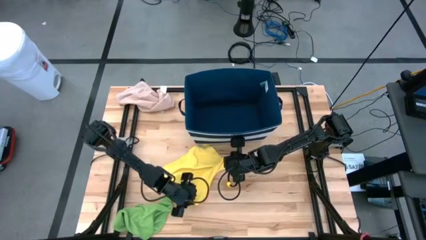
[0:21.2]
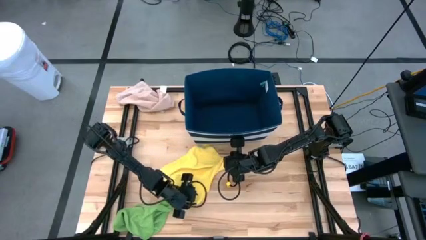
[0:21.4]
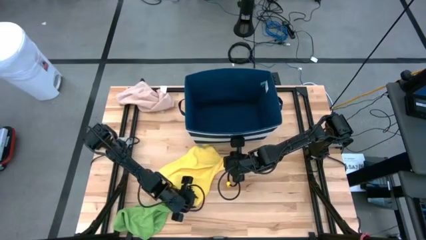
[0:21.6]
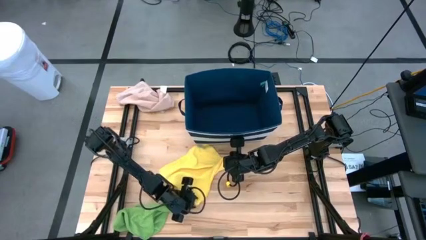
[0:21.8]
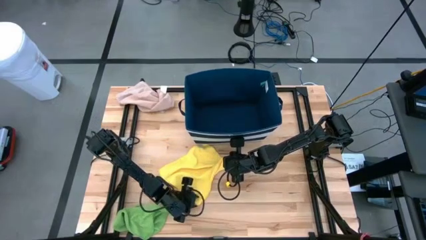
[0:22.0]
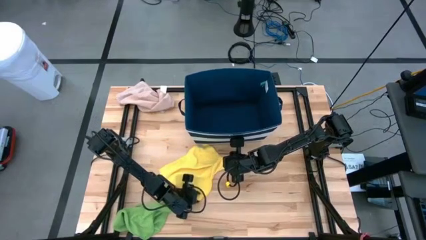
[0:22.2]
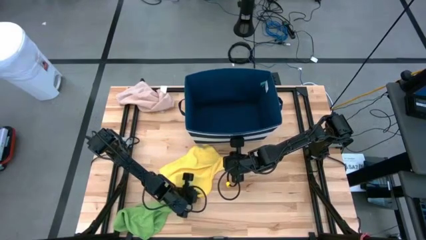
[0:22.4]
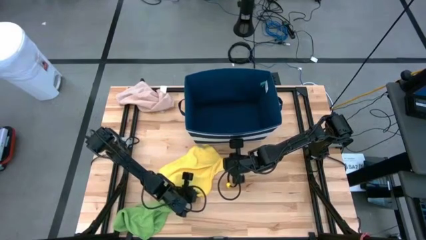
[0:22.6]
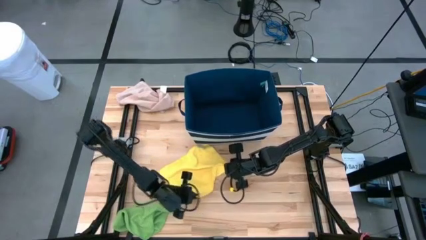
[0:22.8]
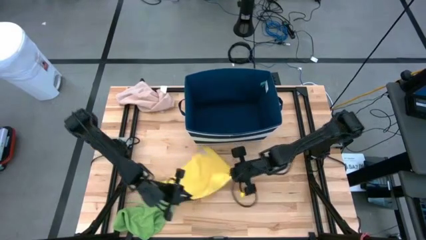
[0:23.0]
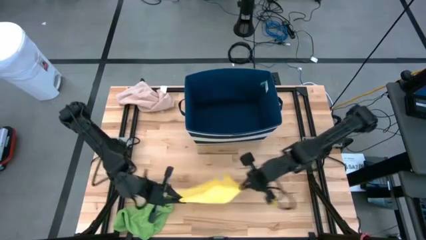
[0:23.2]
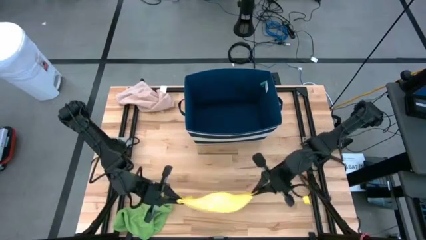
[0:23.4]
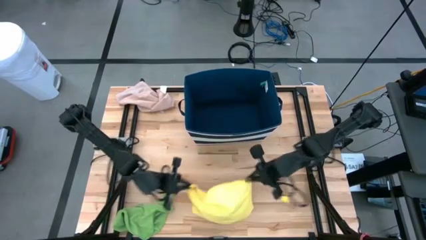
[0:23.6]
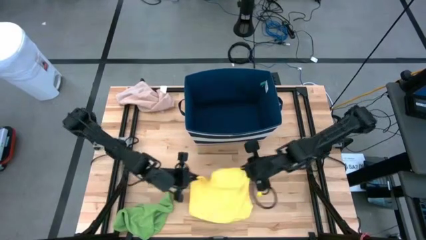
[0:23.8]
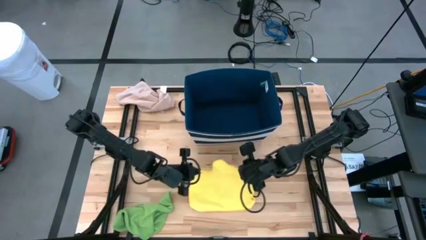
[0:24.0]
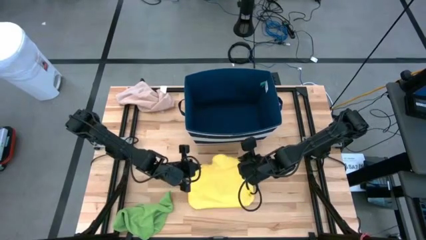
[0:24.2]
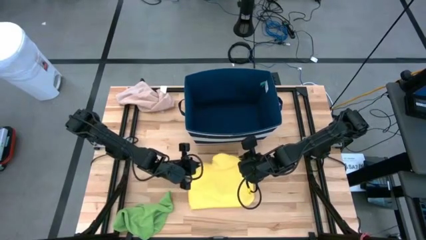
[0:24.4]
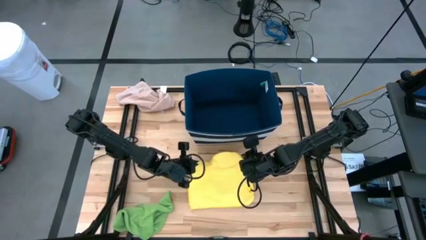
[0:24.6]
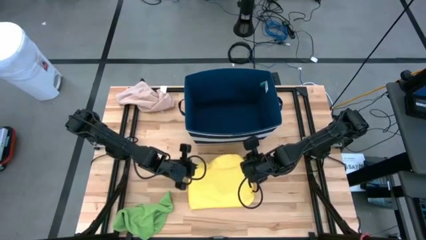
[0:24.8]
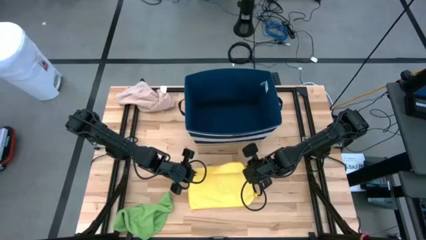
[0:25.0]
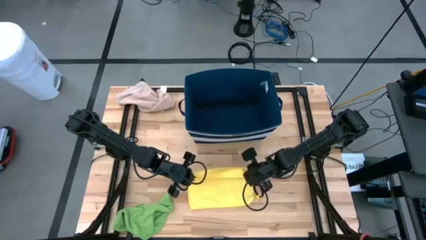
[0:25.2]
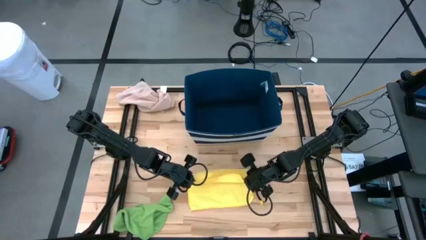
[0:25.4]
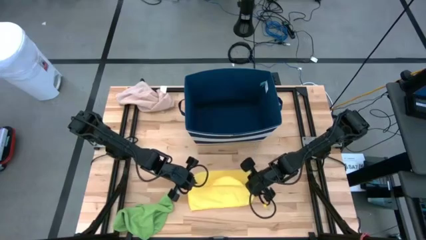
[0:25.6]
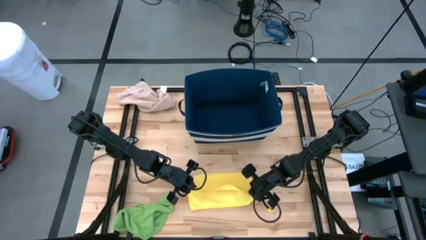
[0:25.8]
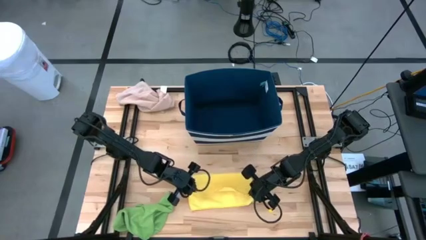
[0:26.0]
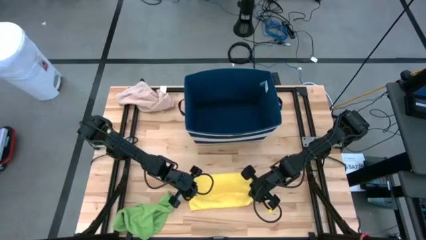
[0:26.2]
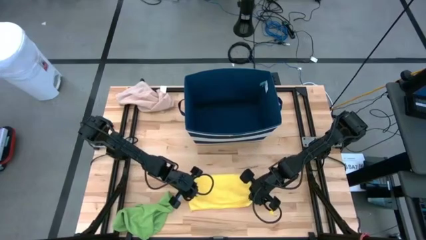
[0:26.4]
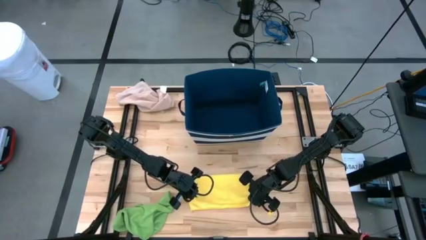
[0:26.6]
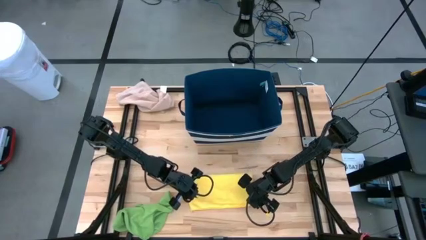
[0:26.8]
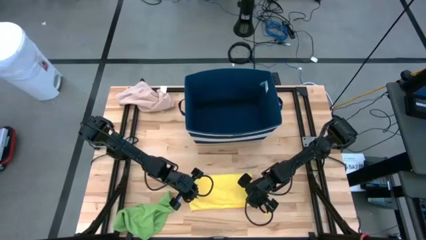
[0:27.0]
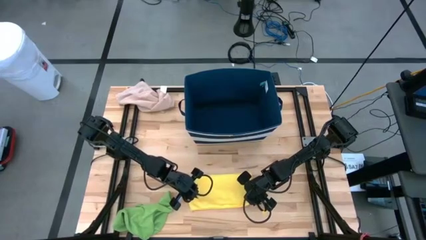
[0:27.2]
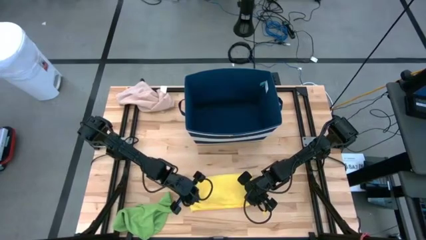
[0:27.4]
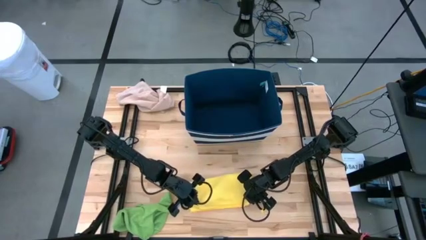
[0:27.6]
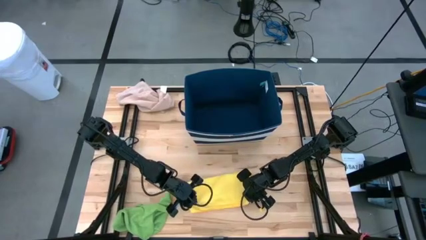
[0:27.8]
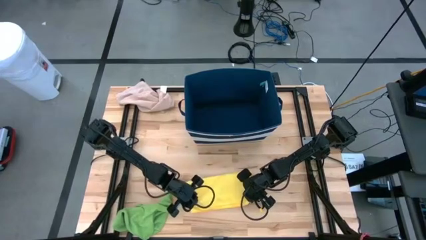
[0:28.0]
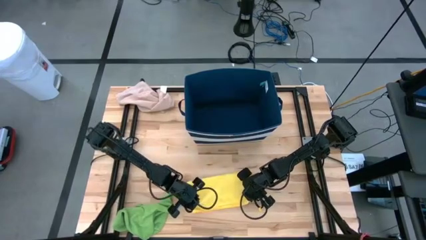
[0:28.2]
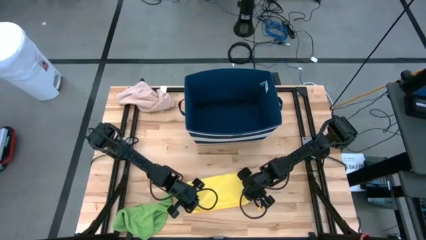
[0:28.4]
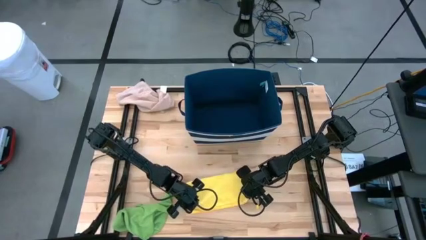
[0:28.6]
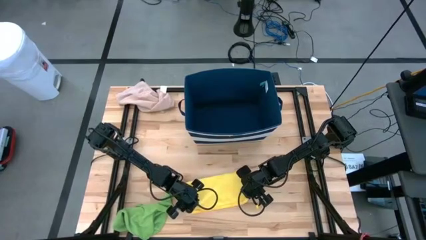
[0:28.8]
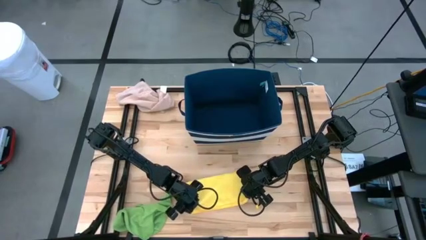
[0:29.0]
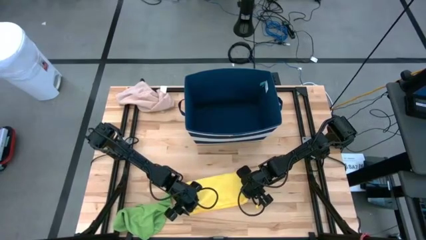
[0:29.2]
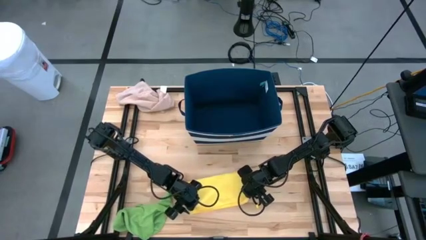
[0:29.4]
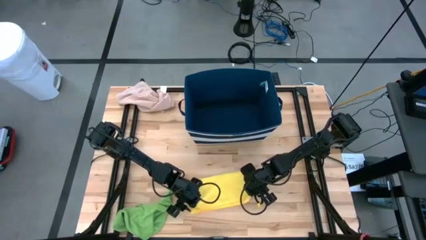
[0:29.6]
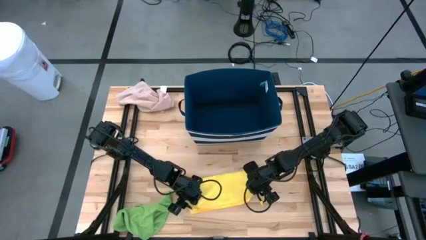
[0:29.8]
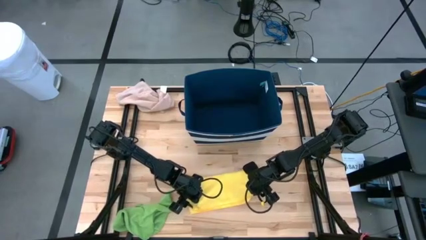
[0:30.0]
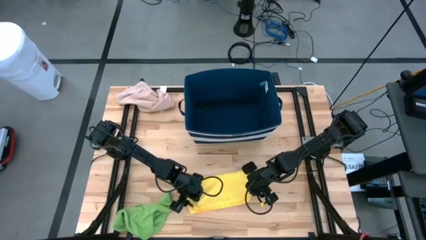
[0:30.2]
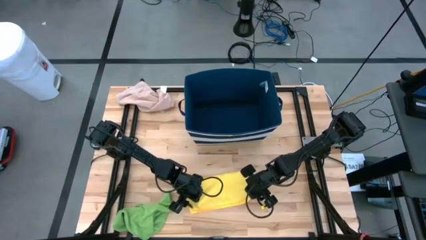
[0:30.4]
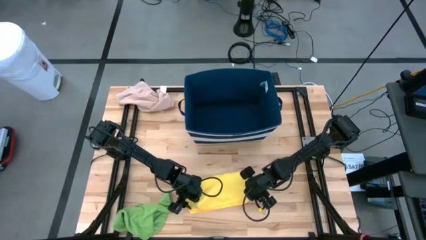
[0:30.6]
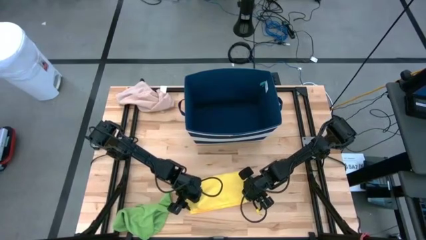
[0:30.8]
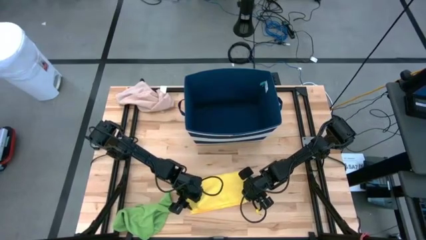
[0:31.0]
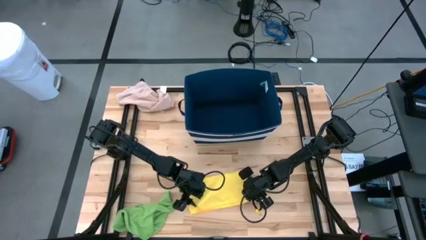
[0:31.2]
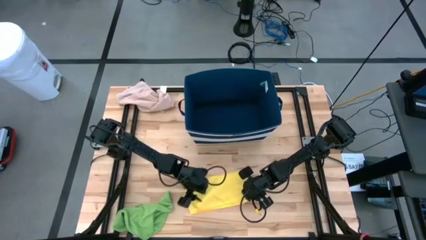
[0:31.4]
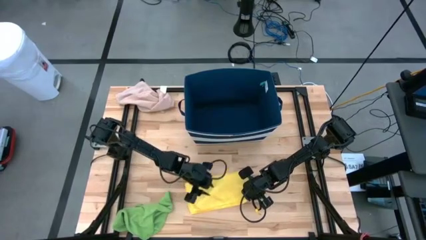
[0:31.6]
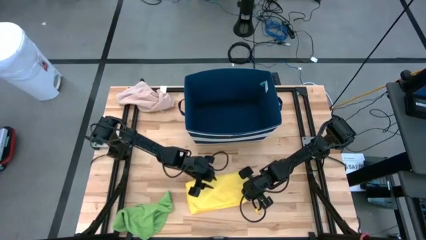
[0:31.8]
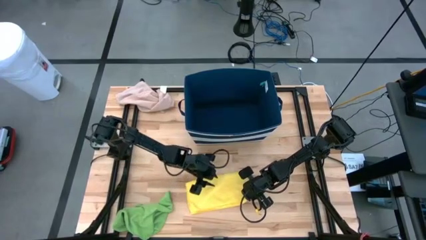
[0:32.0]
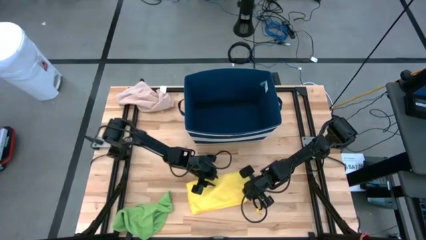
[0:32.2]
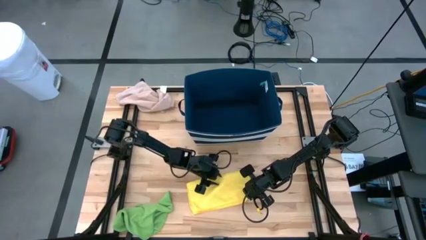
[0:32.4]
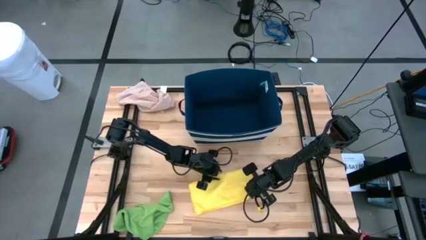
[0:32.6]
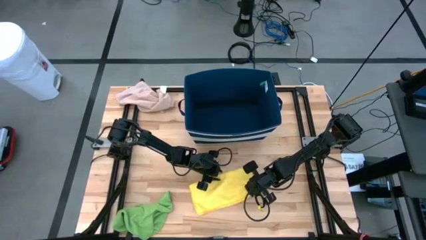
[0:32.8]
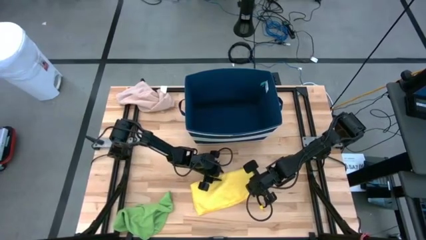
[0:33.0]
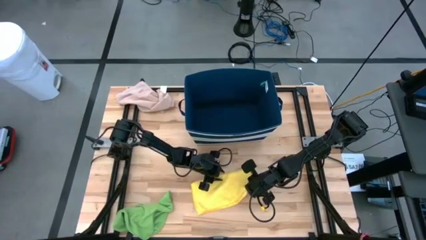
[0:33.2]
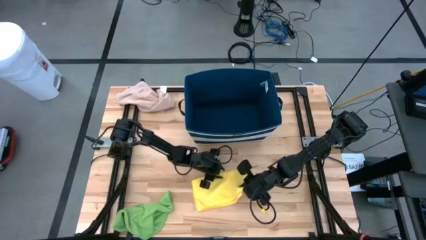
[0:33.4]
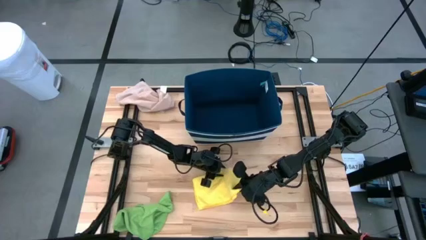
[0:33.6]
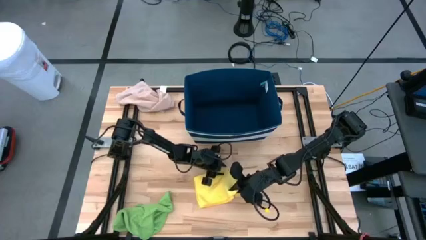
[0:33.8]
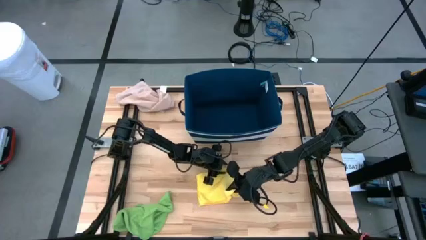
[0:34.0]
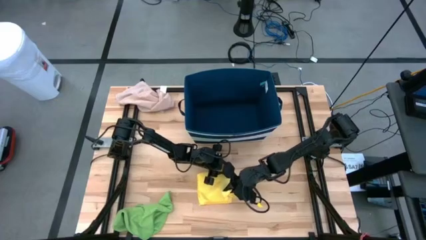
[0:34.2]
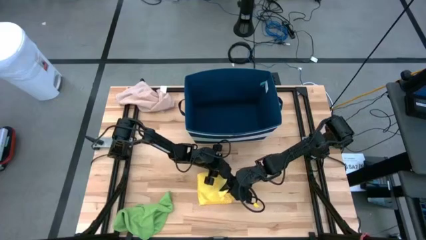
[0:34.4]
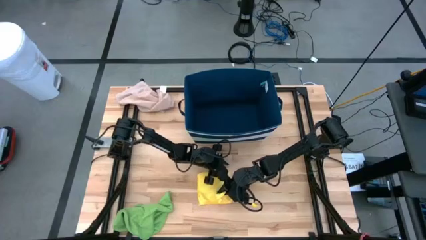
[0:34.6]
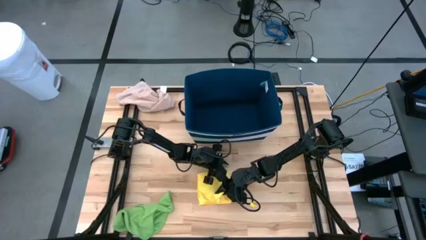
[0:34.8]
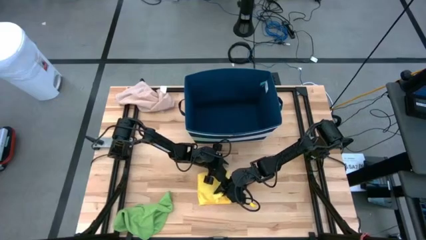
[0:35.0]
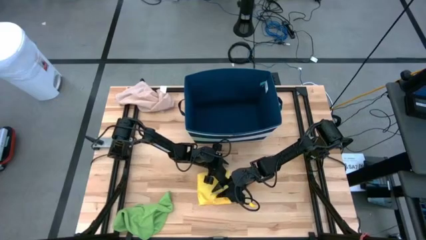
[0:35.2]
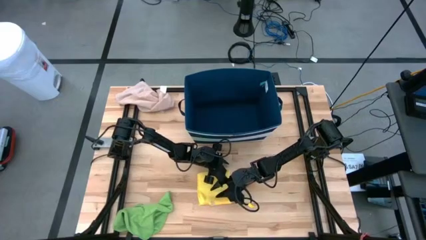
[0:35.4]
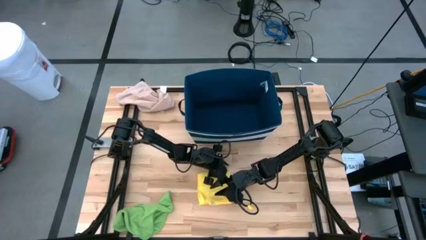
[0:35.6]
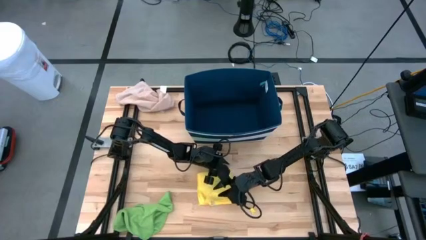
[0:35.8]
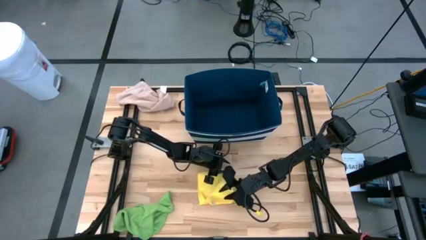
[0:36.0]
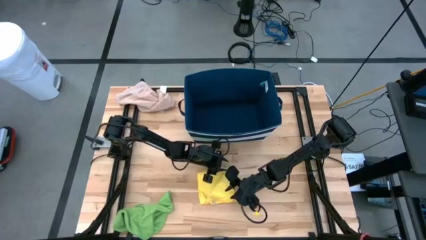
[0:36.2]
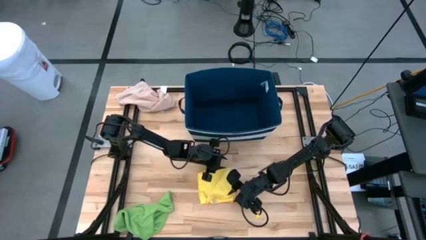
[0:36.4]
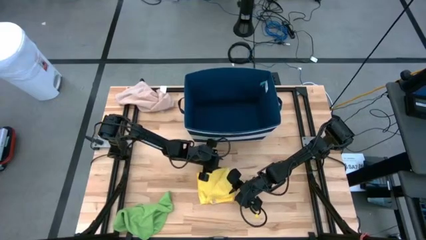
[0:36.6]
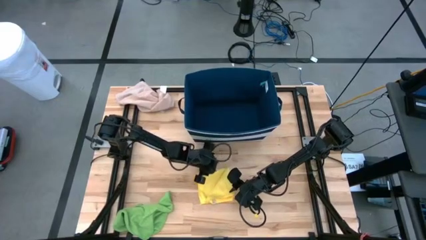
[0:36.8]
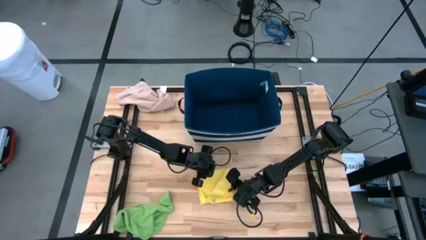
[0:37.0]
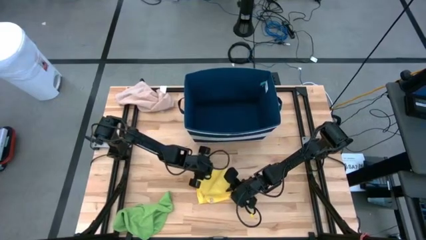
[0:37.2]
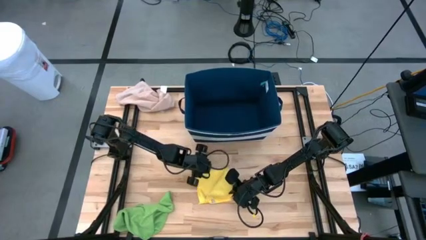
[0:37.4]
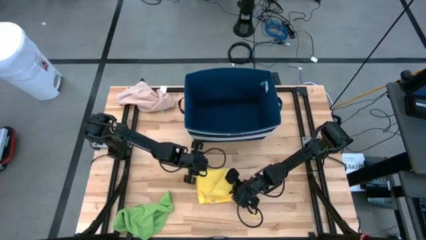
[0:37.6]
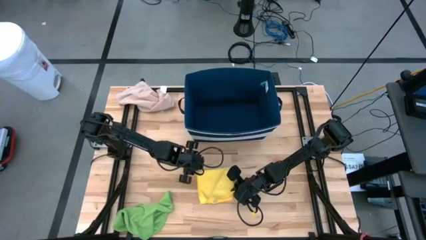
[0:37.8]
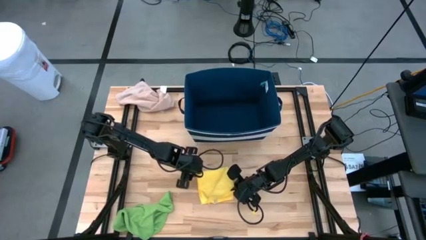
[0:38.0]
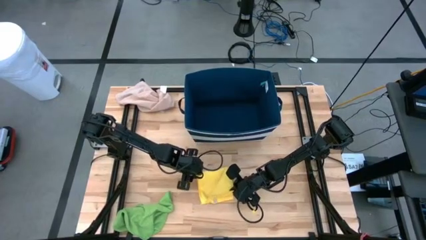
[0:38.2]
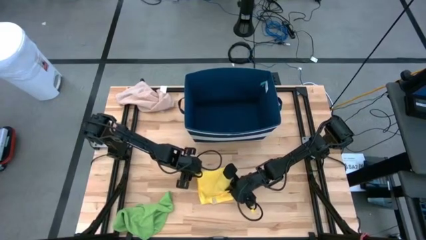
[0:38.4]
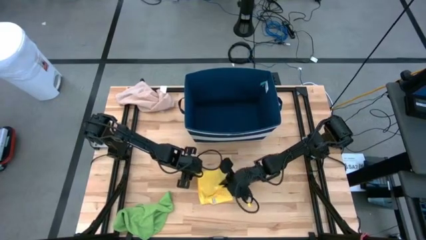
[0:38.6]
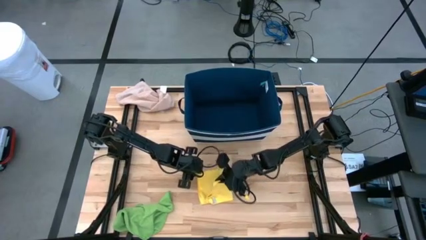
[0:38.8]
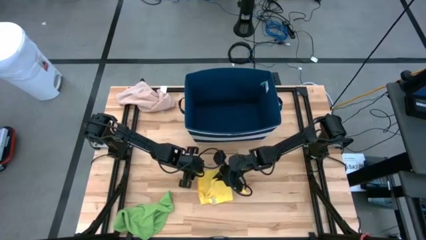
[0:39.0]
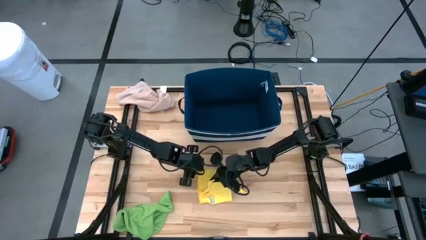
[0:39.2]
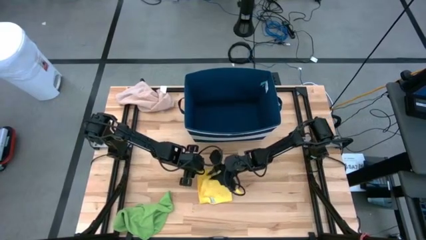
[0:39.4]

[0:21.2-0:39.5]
Task: Fold towel
Fold the yellow towel
